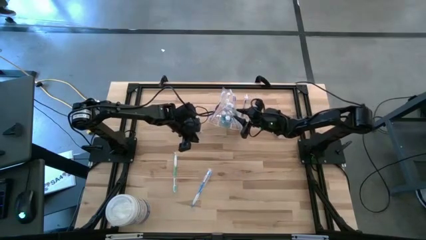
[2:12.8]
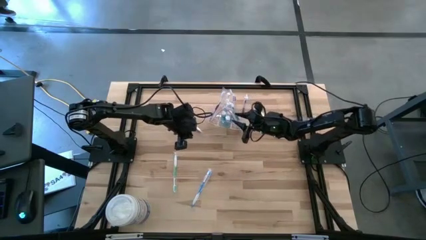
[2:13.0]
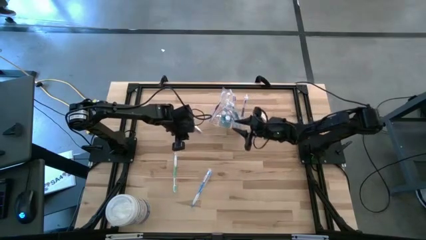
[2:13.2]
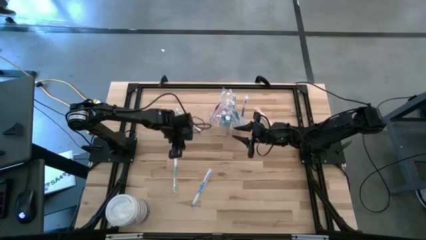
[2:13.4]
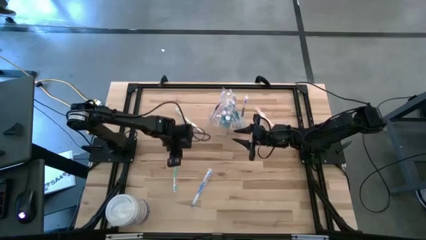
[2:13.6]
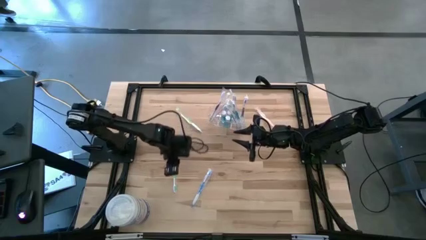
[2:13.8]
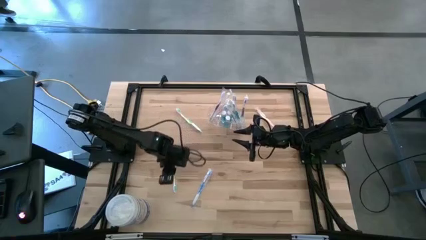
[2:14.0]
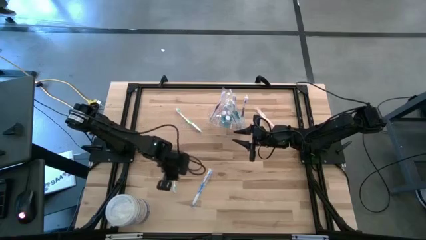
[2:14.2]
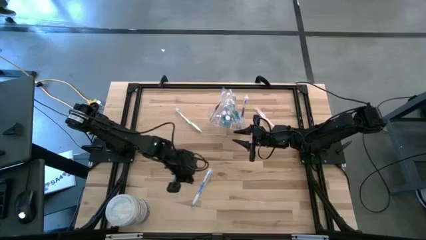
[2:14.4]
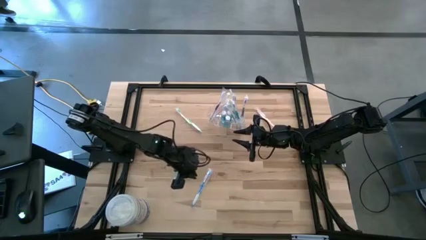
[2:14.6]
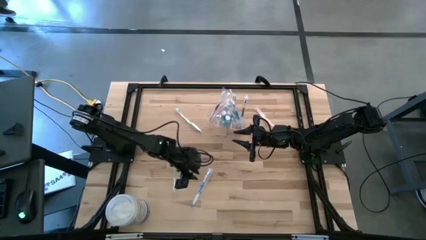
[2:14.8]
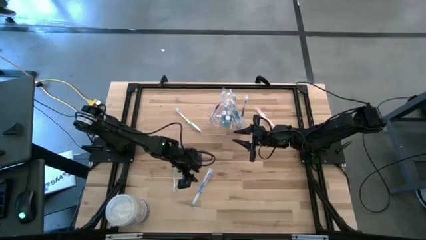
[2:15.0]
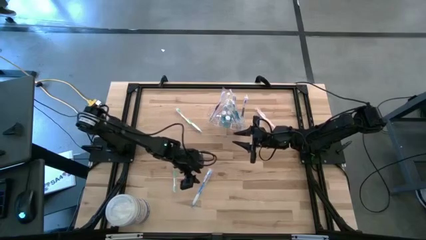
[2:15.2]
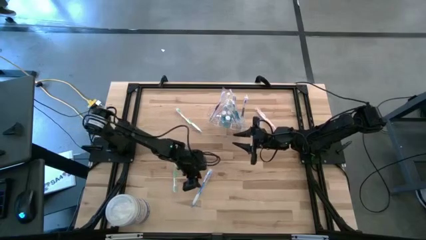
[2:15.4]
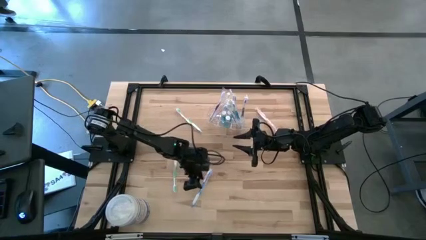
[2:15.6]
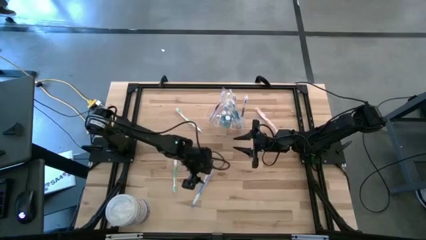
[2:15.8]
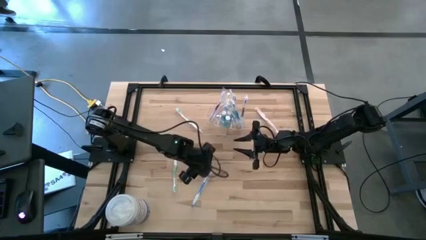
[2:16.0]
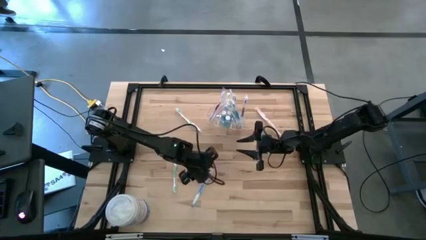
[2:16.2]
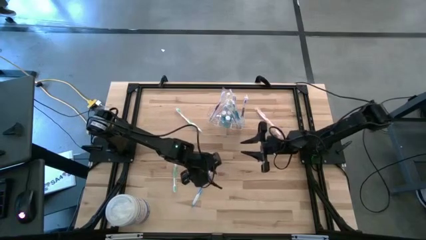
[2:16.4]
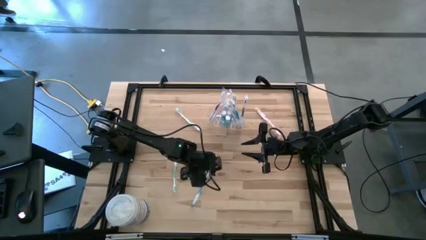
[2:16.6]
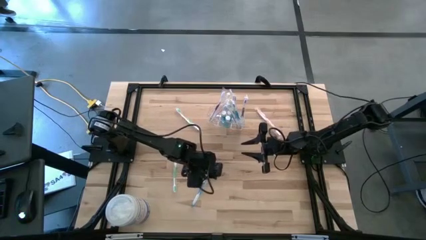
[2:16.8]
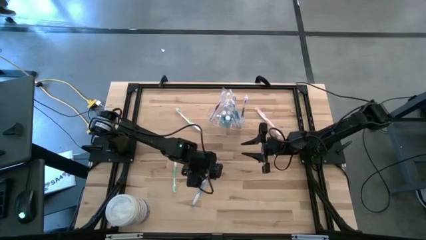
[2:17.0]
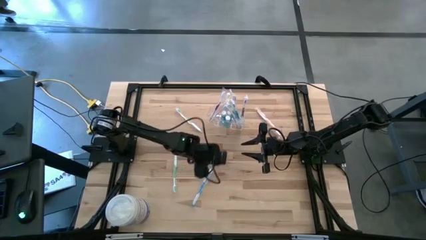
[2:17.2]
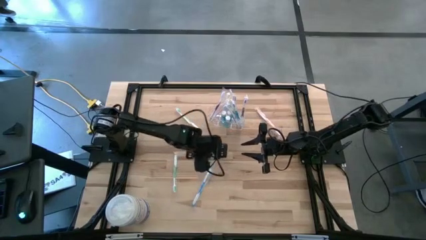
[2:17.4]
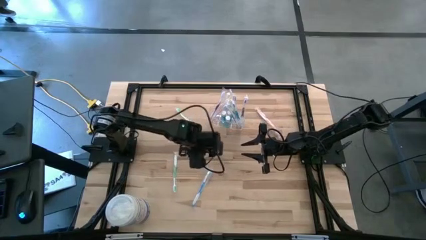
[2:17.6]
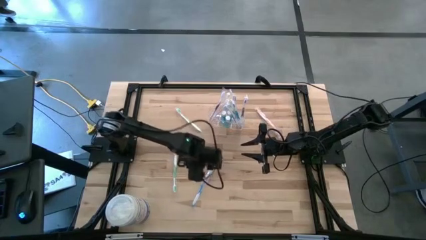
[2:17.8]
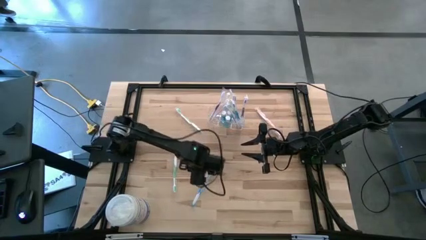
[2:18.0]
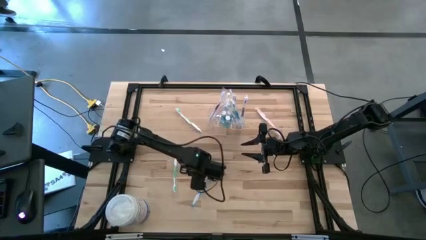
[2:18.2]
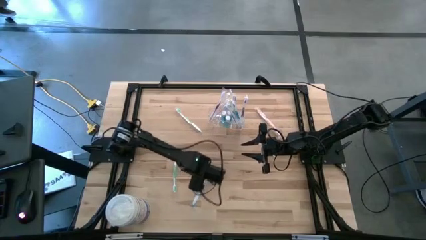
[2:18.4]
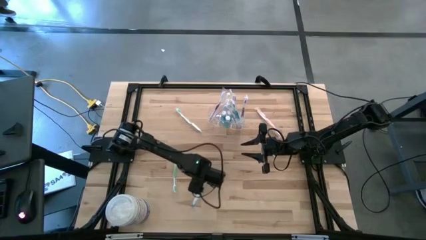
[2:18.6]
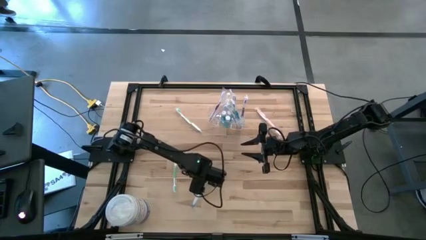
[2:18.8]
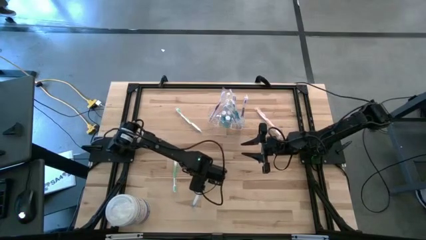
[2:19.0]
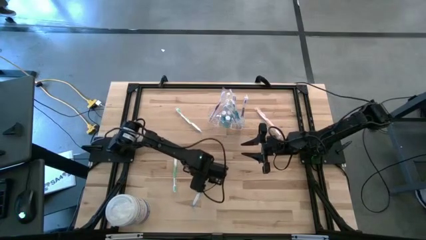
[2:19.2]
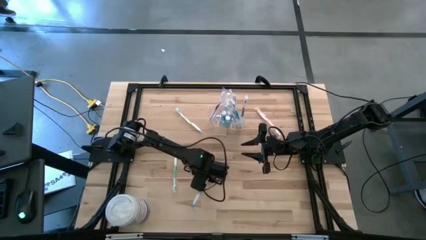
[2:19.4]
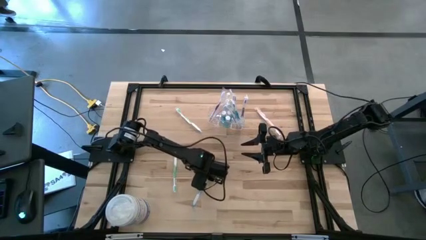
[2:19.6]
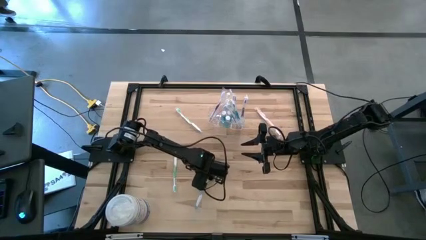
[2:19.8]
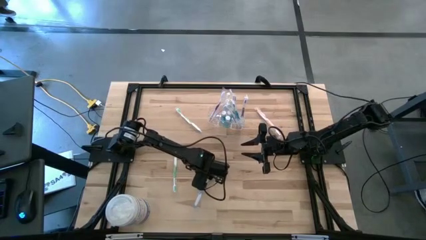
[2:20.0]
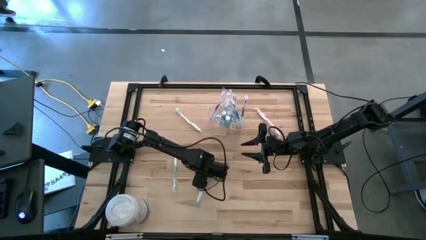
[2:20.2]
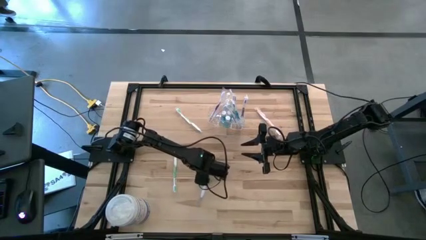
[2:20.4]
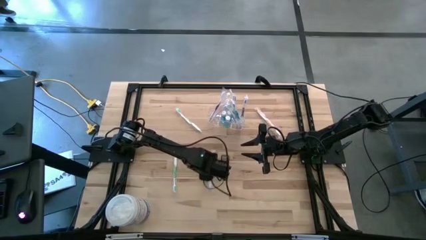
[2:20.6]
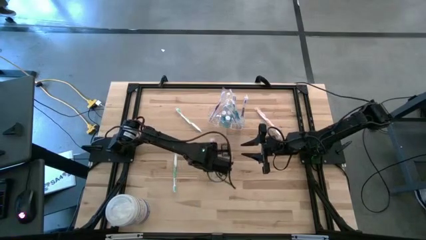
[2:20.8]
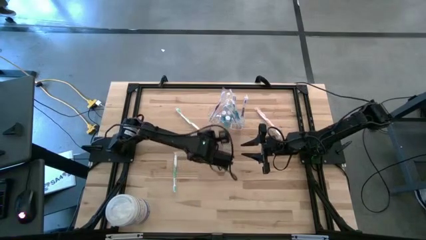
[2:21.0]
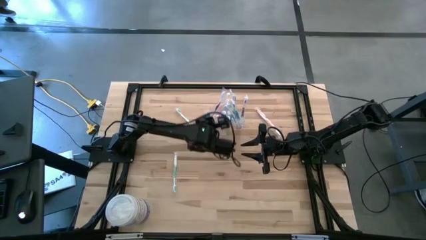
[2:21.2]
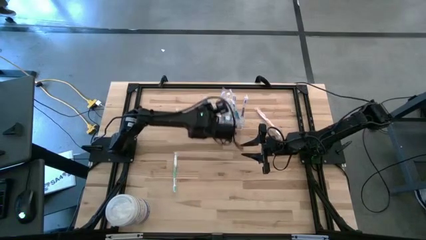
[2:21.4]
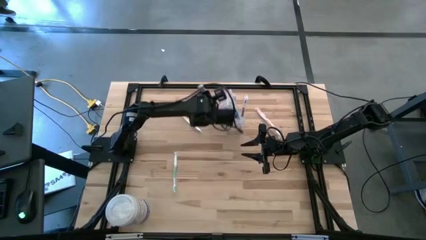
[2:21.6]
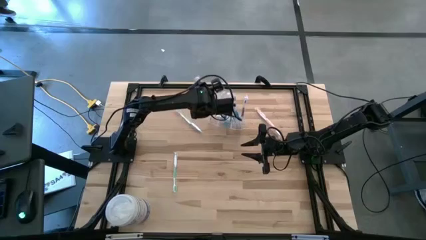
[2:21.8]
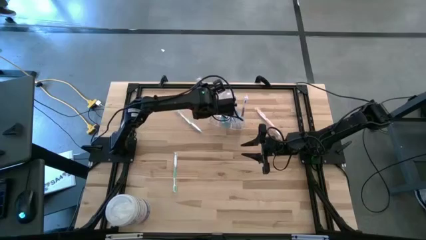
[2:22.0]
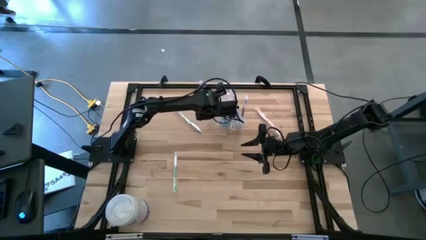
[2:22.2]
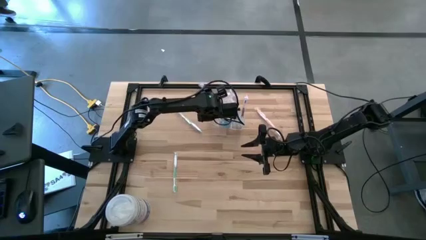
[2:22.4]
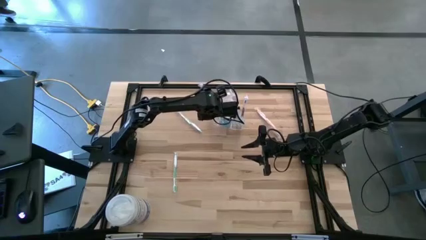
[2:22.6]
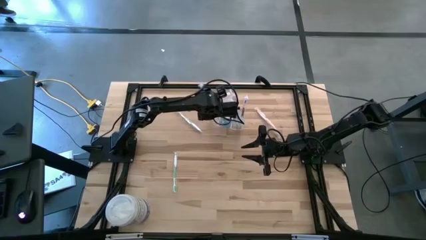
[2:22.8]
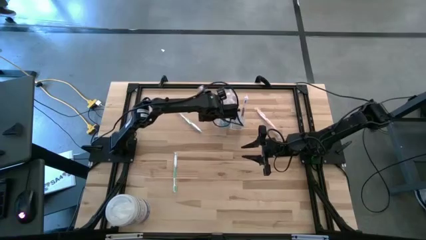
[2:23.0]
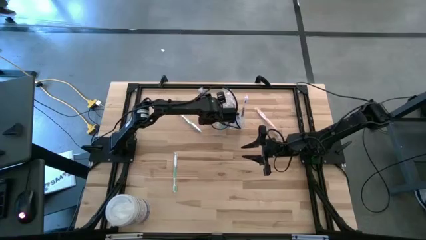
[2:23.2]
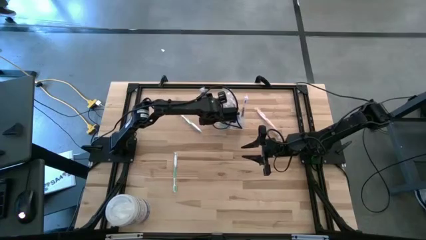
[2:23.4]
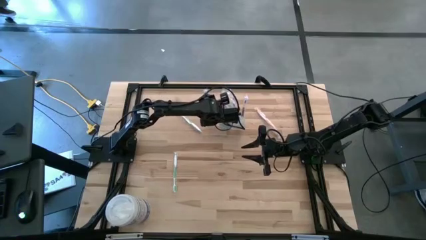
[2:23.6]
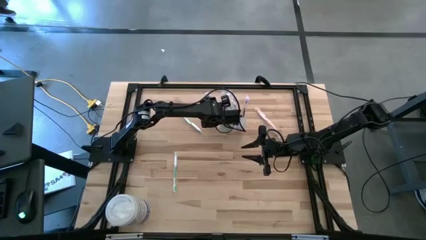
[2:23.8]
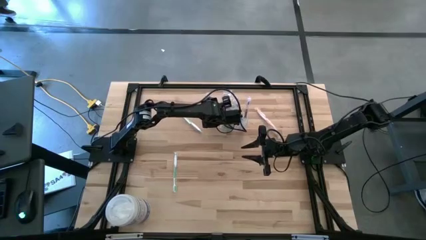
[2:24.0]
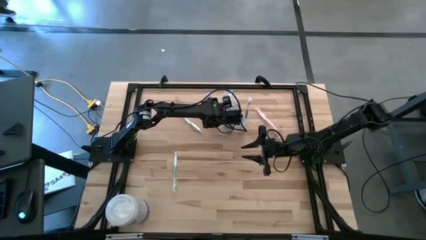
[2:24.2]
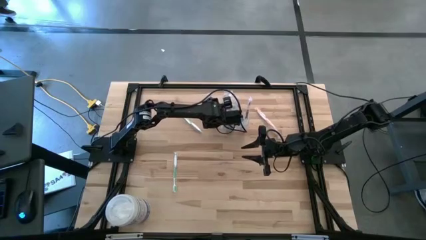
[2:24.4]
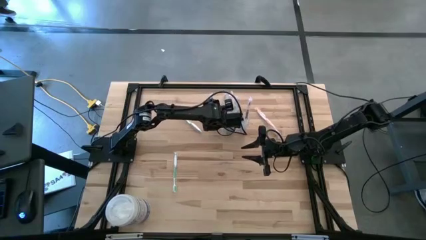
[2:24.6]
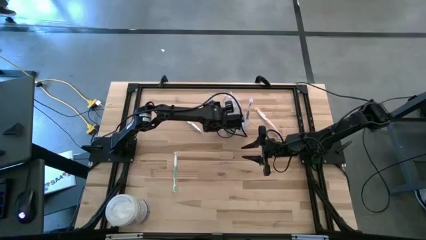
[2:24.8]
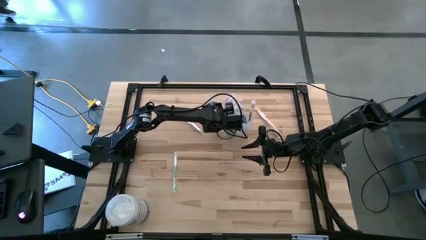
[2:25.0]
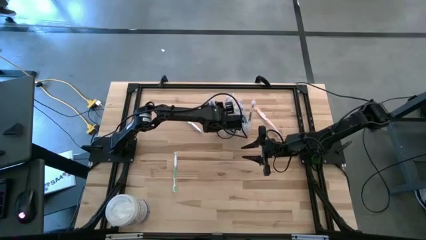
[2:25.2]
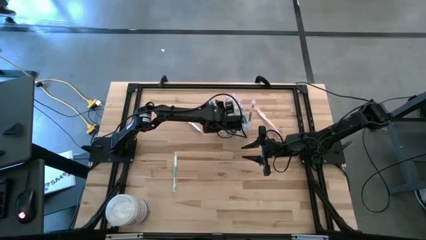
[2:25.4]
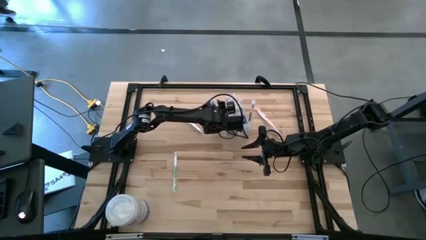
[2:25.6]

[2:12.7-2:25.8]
Task: Pick & Place toothbrushing station
Put the blue toothbrush into the transparent organizer

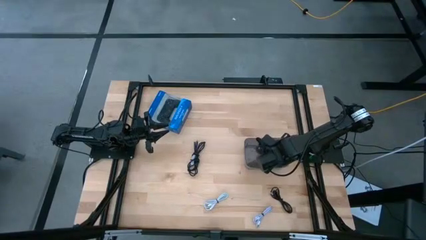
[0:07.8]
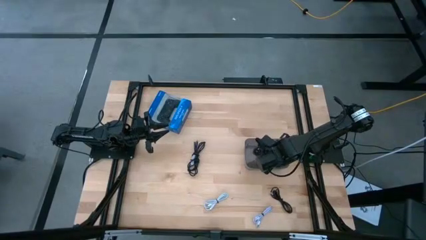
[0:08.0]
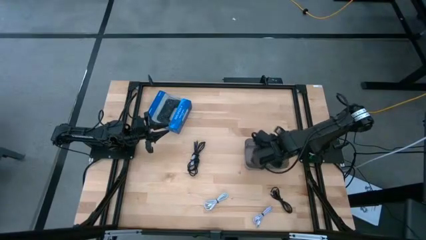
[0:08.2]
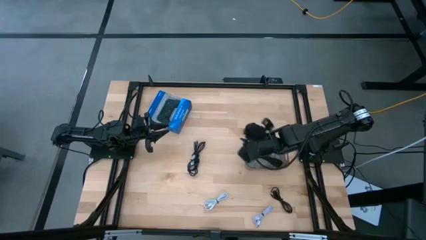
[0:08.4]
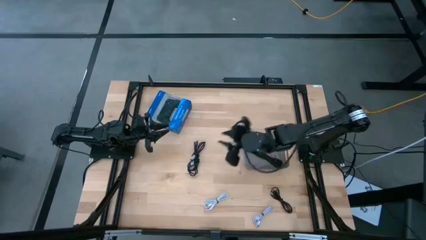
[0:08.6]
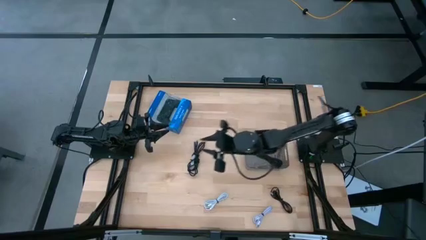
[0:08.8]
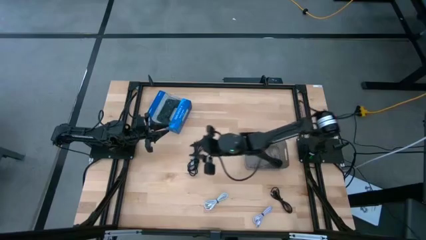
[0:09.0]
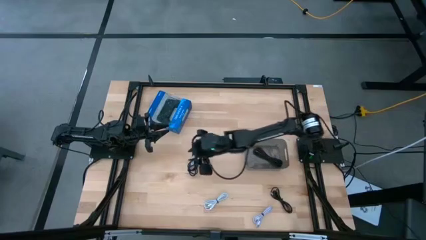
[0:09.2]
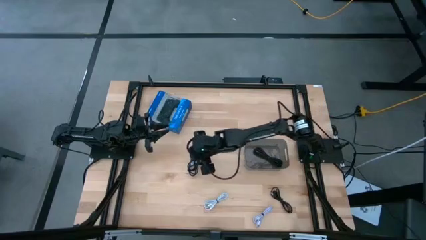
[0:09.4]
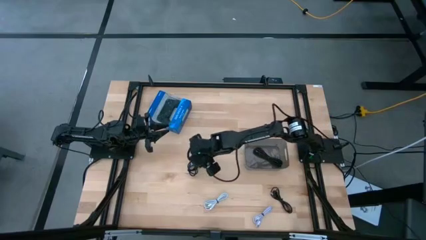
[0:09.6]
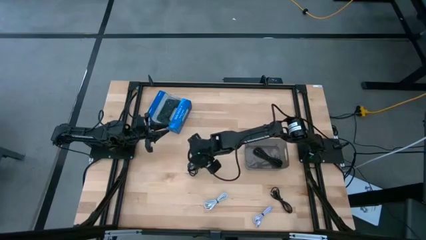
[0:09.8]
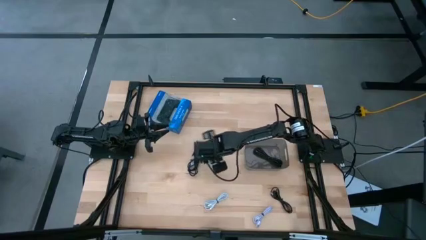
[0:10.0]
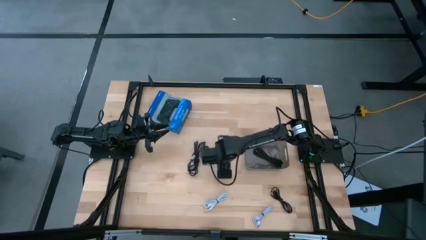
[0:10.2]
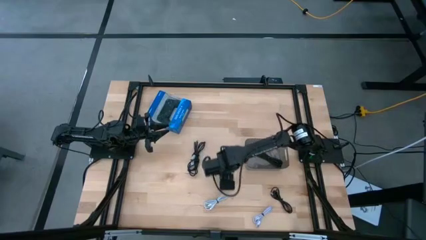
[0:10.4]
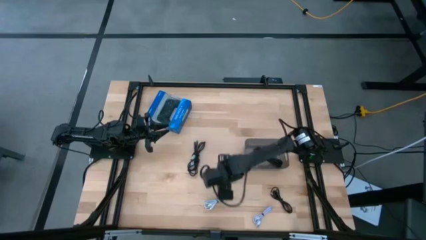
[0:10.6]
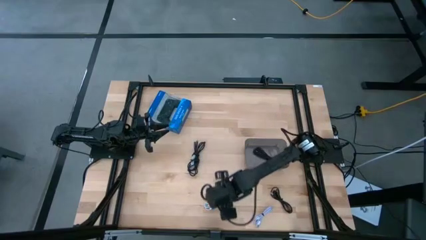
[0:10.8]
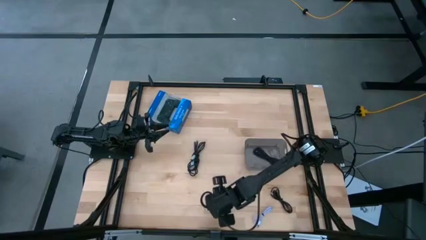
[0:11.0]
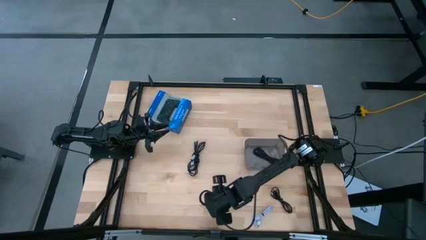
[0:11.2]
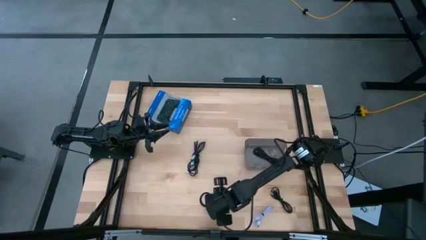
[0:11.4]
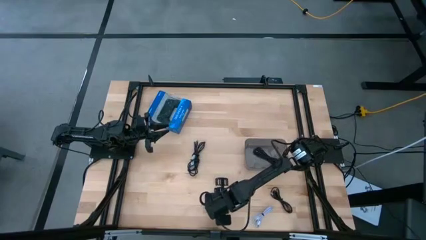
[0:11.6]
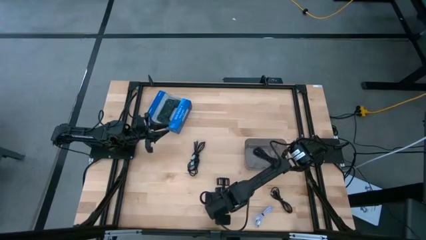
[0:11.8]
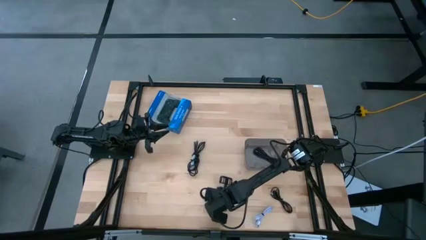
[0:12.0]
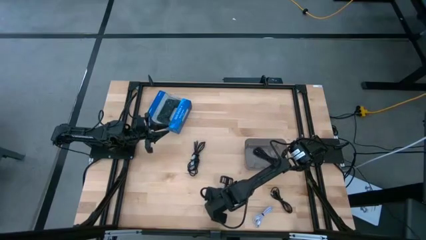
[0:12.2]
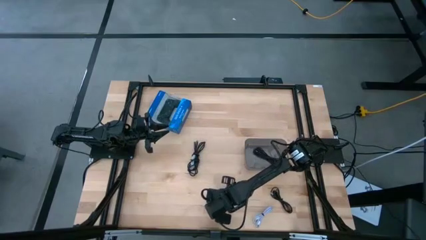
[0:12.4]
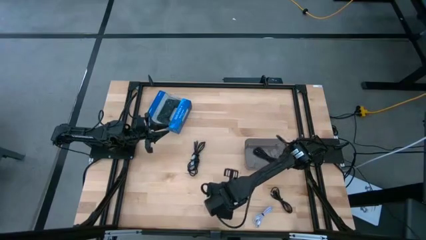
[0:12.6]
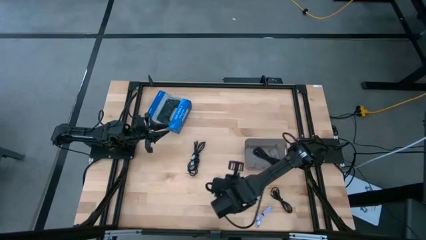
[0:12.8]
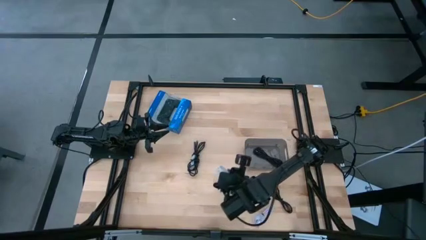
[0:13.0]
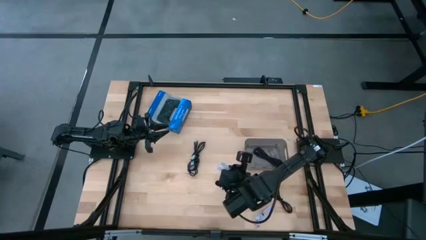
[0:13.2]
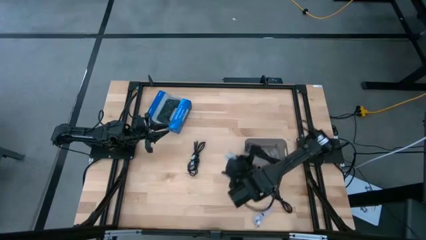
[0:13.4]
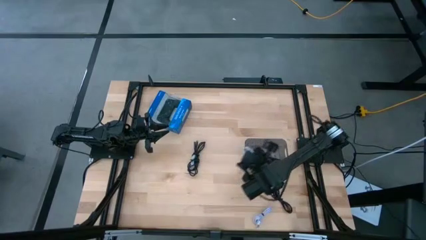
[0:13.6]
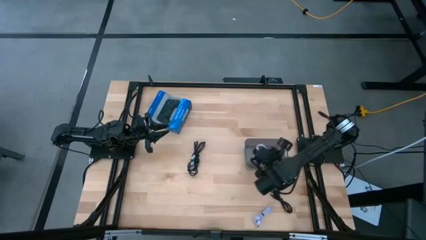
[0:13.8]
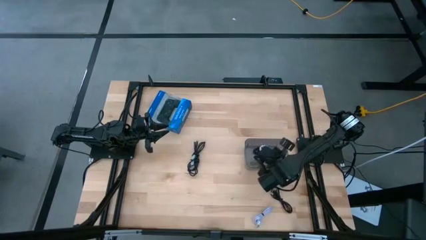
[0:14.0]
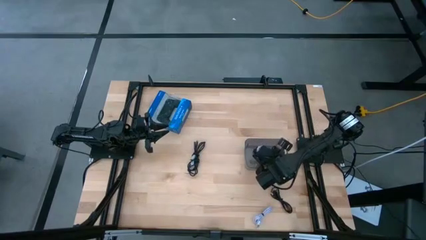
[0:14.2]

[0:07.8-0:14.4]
Task: Pick and place USB-C Cables
Put the white charger cable into the black bin
